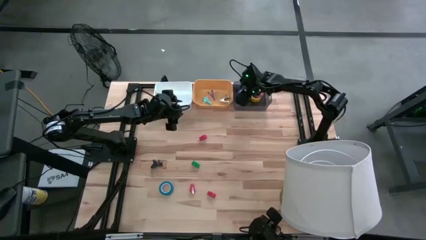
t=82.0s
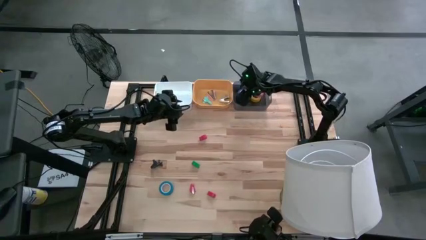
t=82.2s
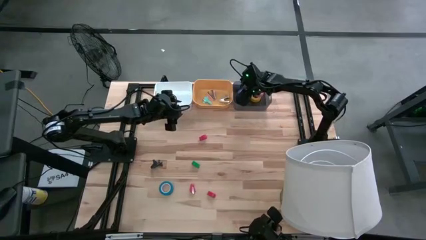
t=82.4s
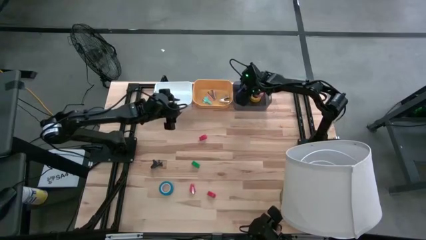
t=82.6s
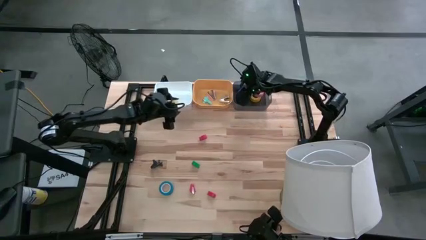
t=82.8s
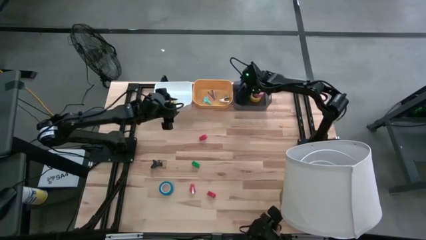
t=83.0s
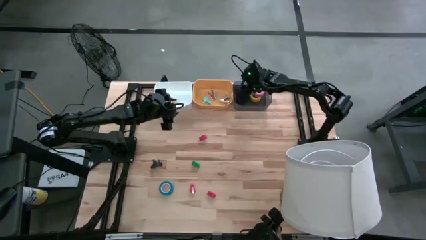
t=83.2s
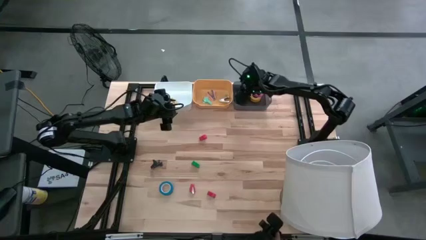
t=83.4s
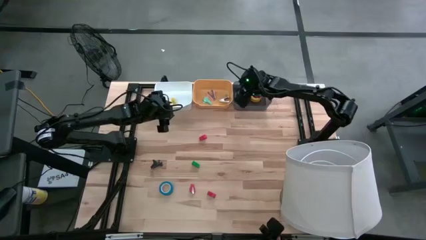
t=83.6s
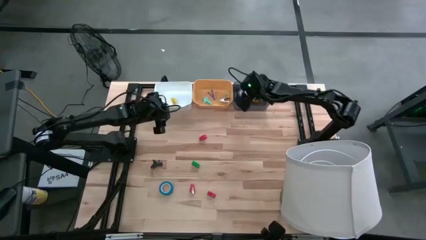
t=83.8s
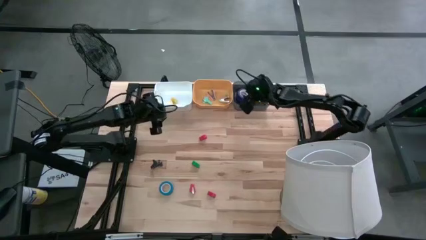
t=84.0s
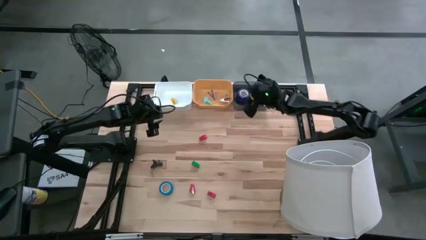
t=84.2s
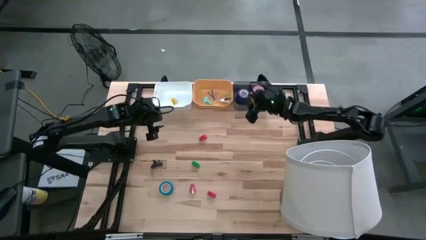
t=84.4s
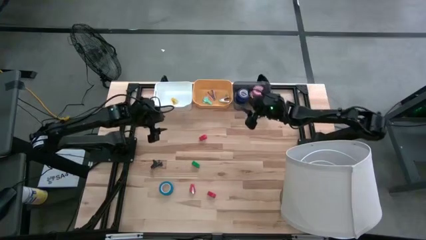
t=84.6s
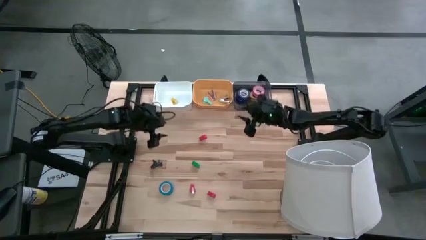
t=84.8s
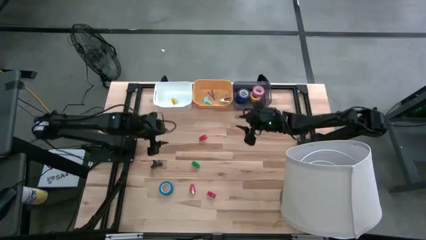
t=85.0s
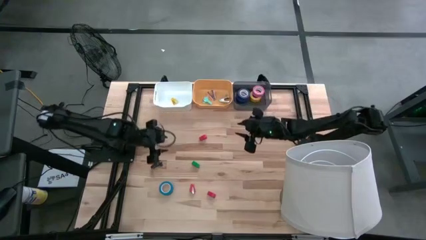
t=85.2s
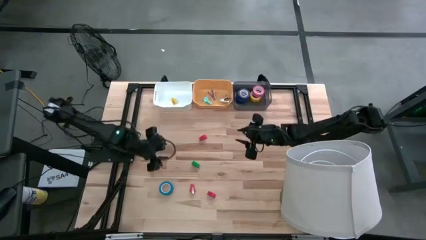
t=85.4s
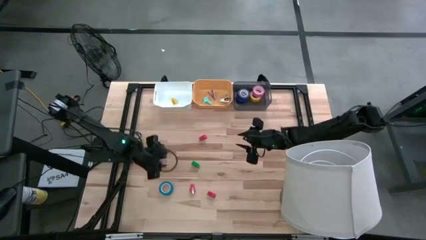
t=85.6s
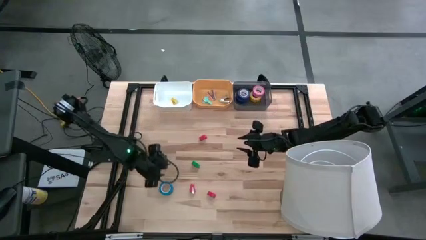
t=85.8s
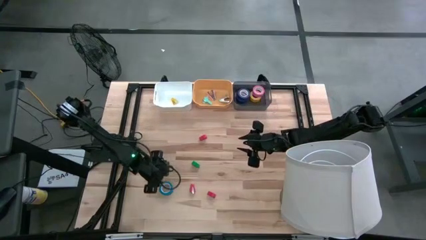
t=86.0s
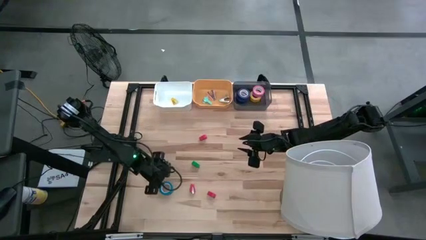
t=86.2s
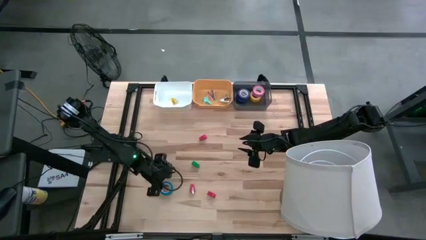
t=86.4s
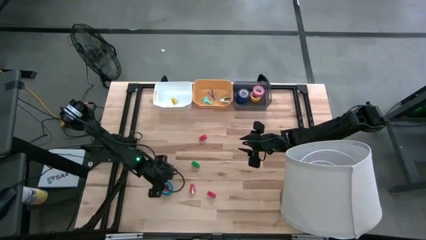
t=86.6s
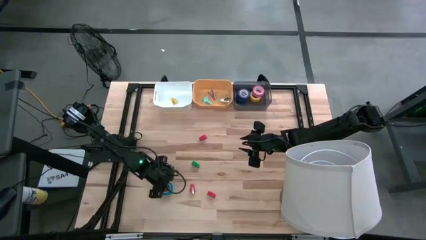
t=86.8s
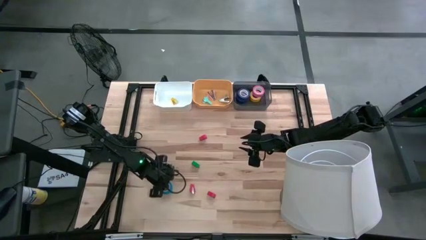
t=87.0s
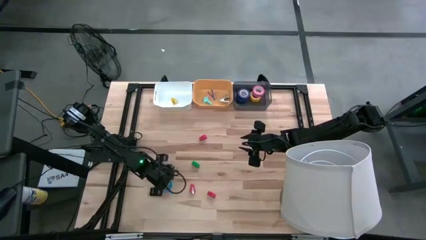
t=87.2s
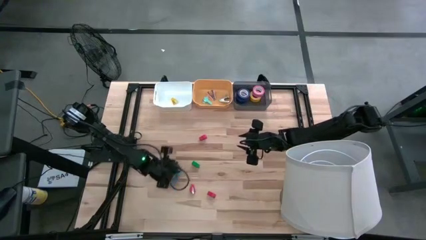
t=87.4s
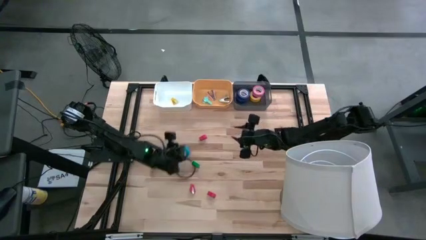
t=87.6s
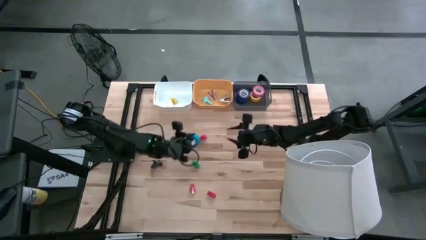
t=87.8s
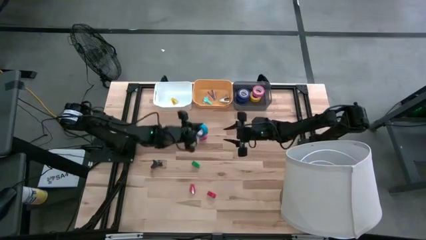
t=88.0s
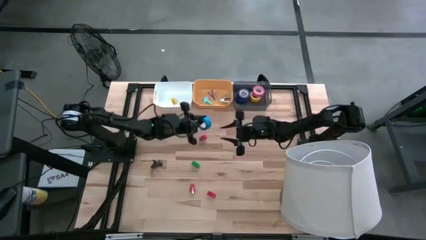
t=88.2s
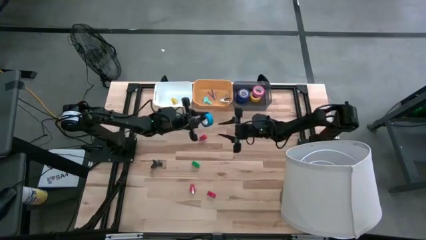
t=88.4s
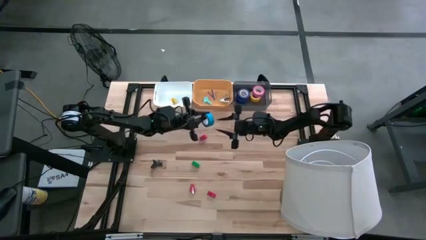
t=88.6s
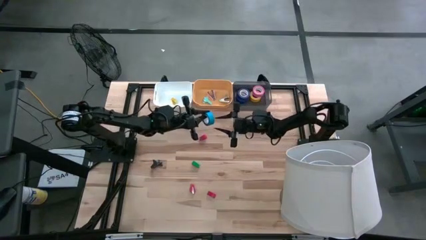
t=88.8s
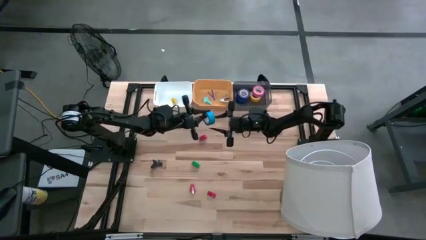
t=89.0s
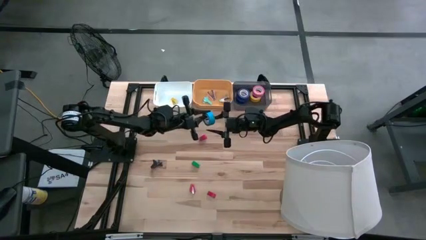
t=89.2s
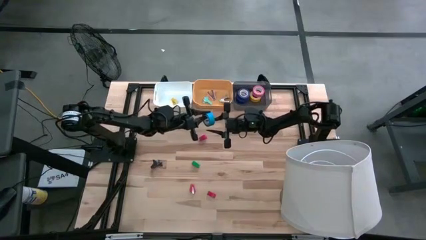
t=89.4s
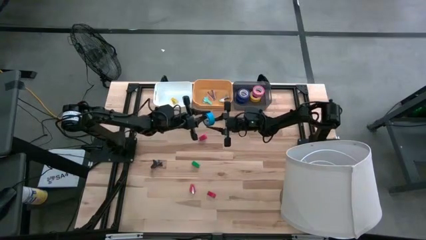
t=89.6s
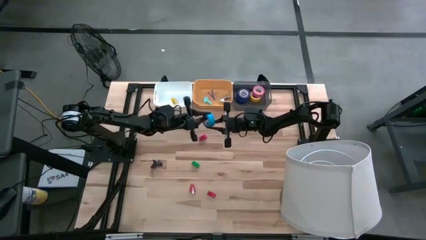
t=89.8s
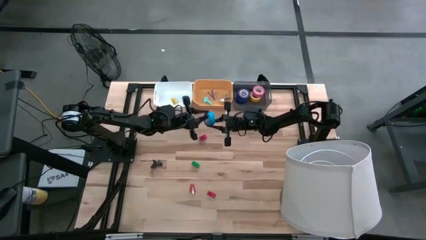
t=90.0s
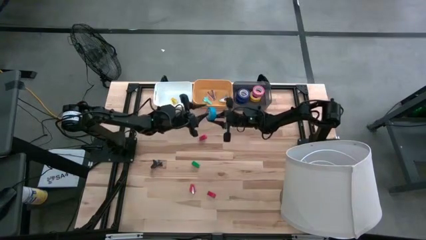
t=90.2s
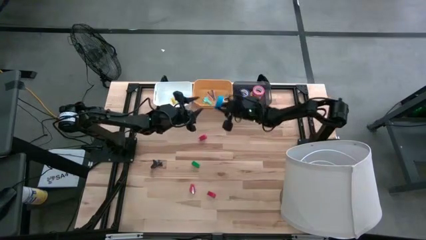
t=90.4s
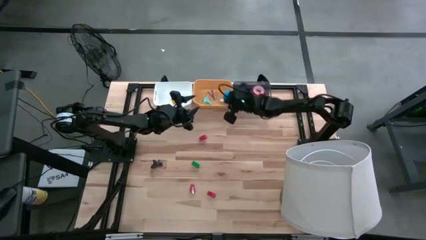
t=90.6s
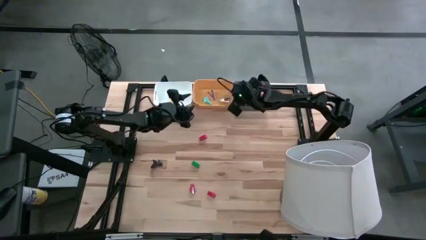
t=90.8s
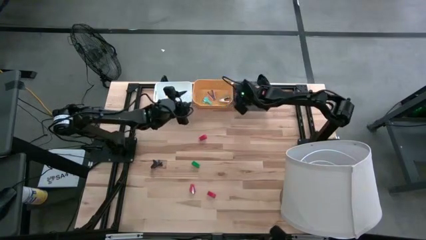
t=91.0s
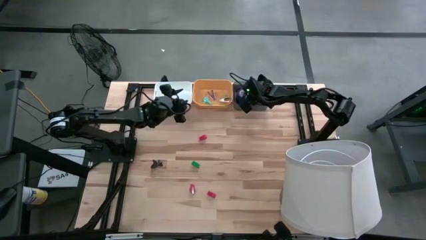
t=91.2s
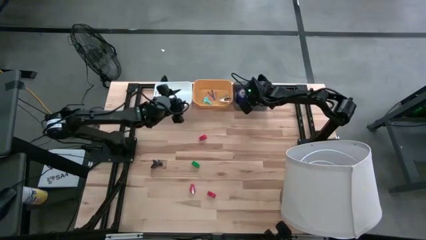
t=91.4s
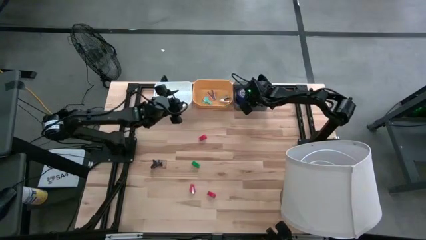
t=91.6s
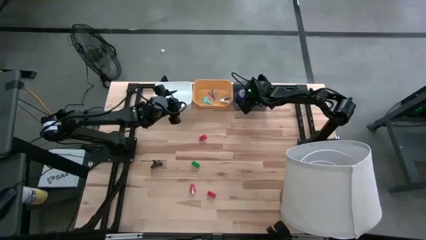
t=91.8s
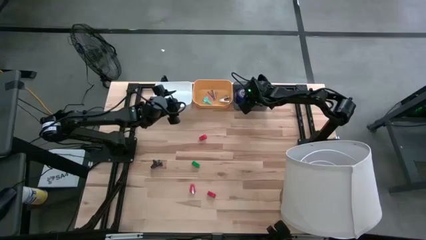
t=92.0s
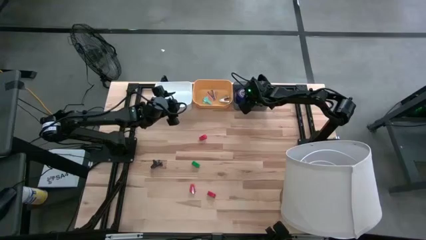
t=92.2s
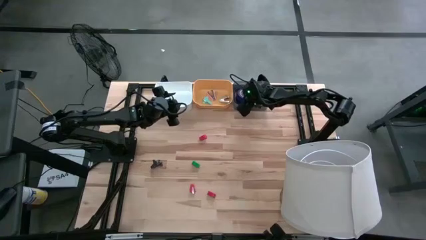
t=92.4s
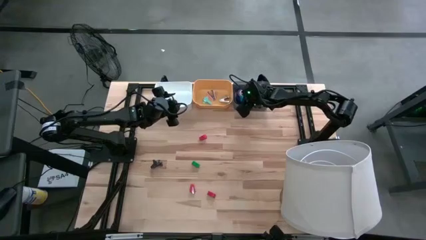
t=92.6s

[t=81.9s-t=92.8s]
Task: Pick and place Stapler, Stapler remover, tape
Put the light blue tape into the gray bin

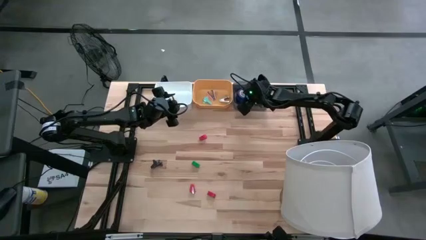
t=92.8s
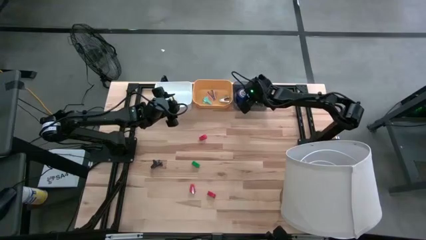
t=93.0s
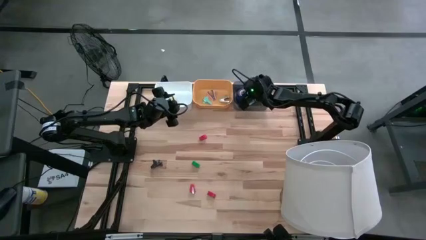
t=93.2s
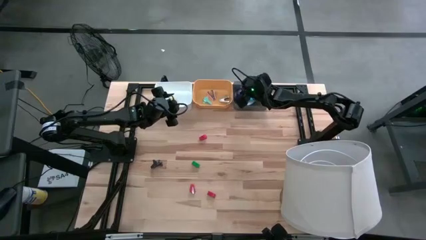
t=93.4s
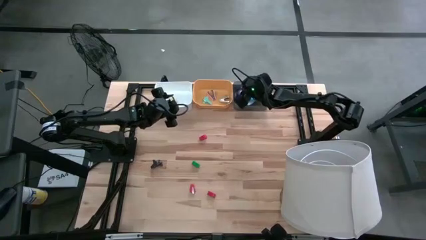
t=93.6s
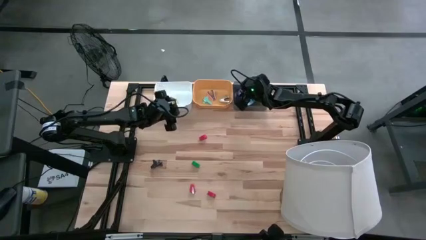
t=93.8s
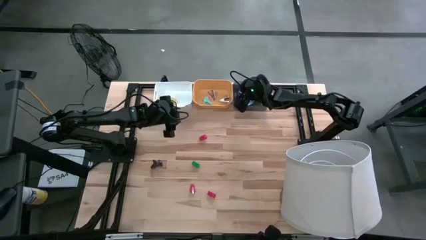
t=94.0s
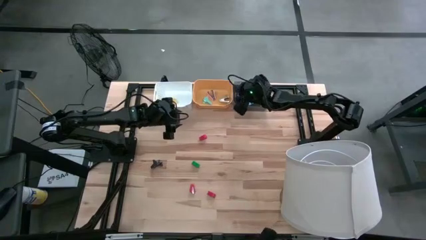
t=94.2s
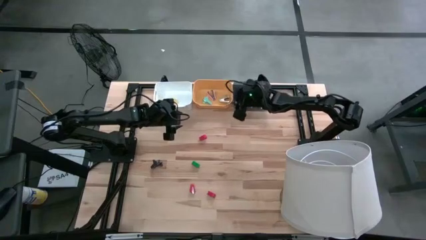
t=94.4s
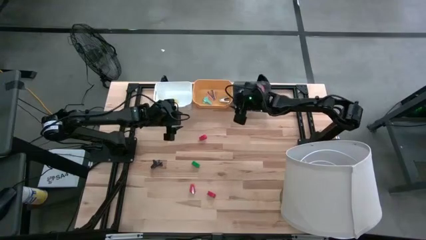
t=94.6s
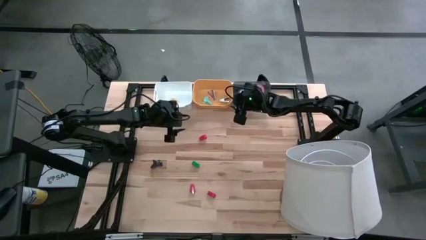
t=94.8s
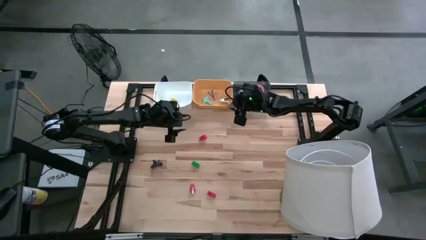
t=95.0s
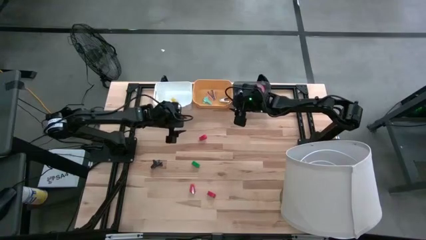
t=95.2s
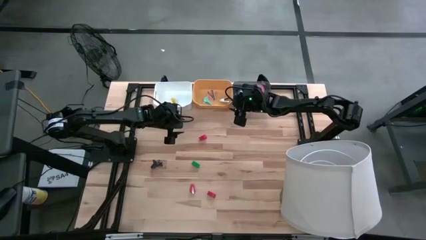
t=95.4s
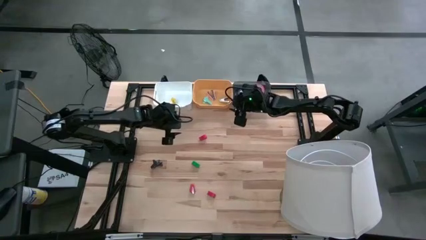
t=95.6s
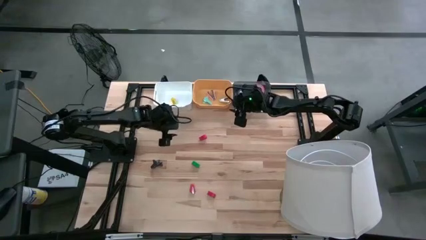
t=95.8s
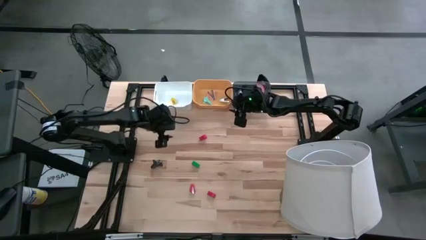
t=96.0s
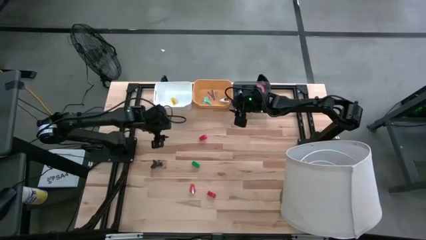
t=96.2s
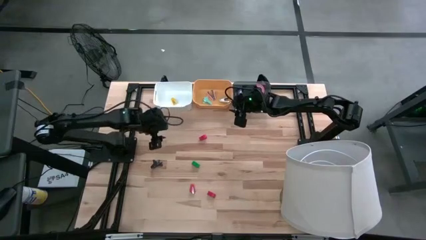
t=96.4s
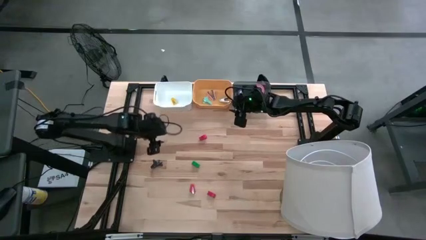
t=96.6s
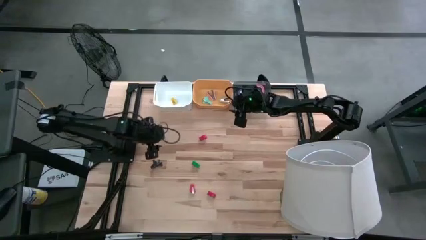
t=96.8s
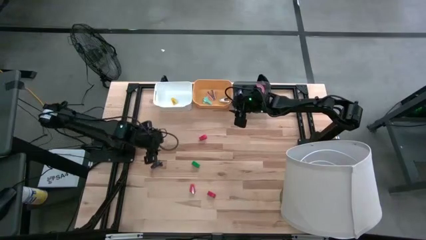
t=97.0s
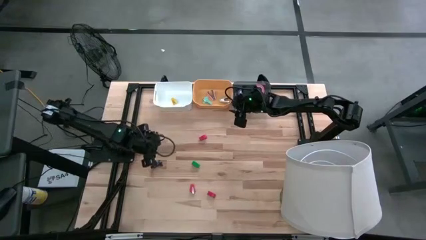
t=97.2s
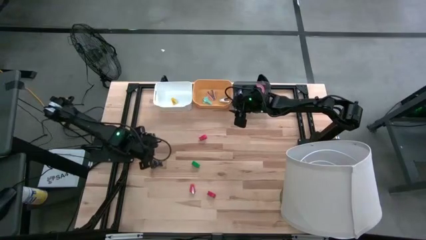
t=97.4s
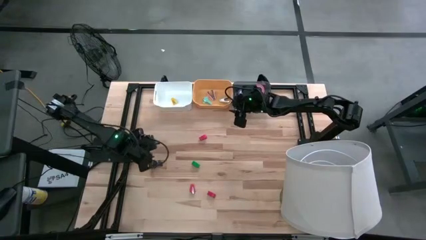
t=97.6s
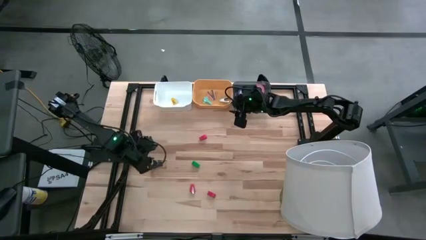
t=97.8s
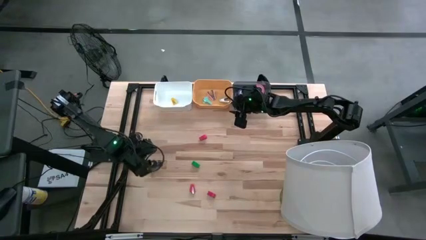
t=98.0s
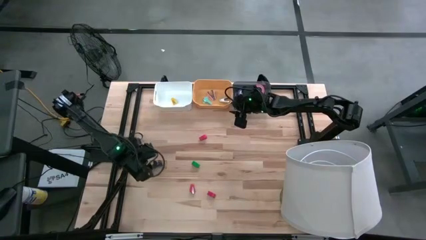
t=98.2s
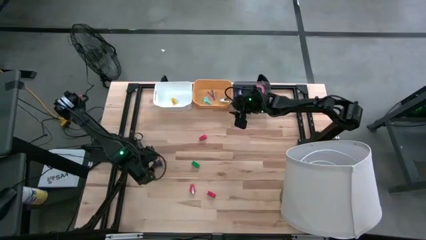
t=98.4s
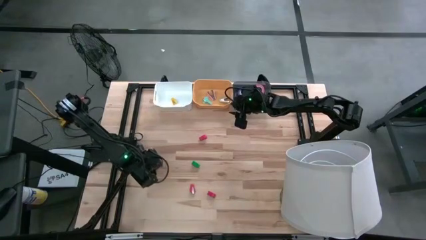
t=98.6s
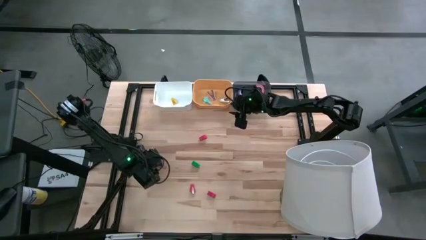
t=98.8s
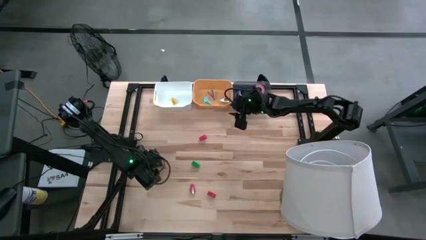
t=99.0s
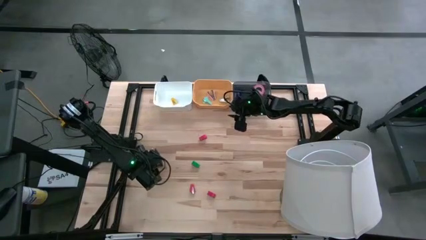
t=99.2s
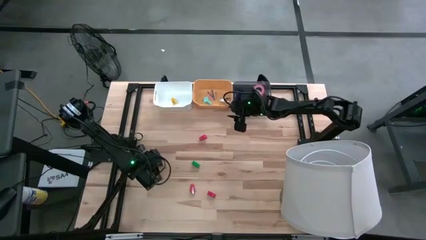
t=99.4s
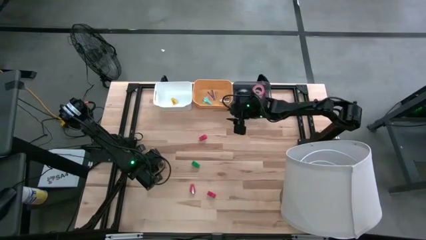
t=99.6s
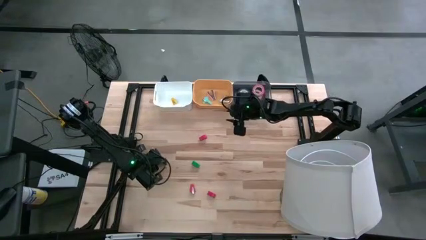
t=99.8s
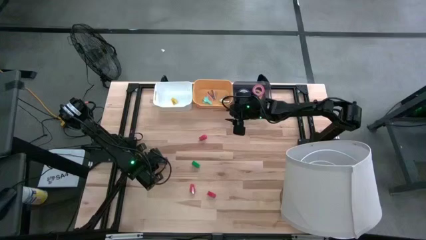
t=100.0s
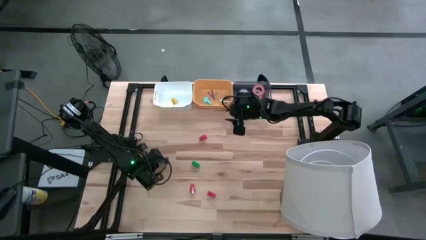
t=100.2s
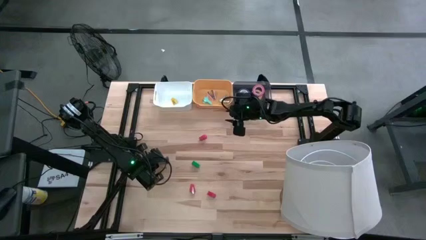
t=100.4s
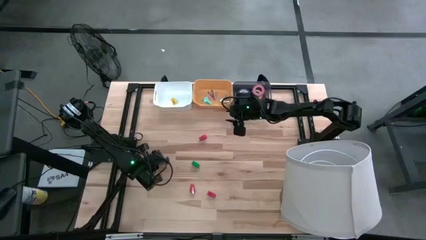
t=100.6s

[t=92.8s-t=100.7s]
Put the black staple remover into the orange bin
